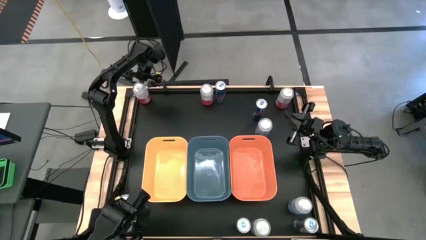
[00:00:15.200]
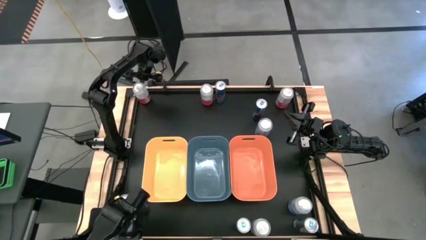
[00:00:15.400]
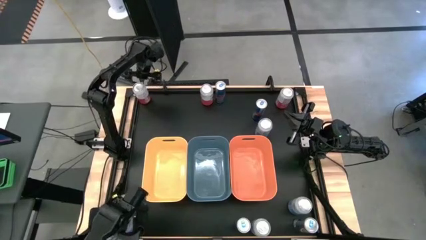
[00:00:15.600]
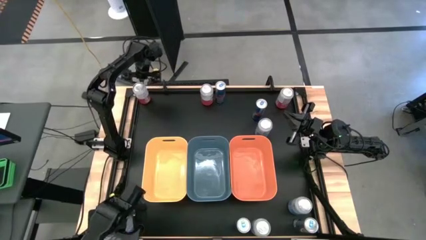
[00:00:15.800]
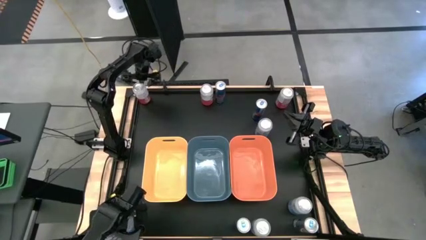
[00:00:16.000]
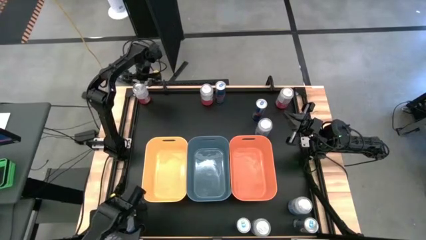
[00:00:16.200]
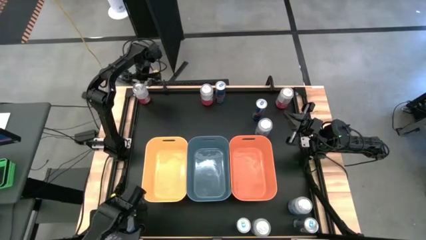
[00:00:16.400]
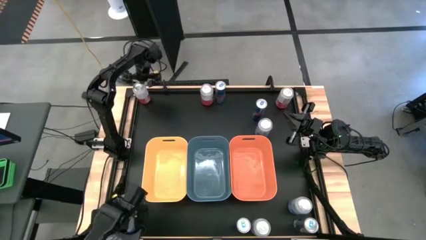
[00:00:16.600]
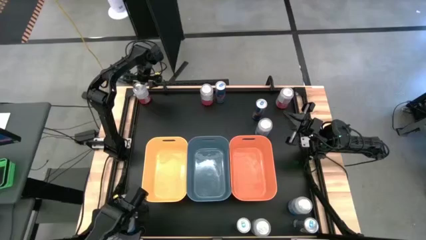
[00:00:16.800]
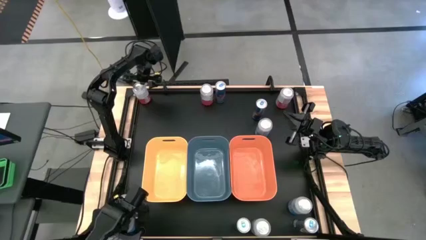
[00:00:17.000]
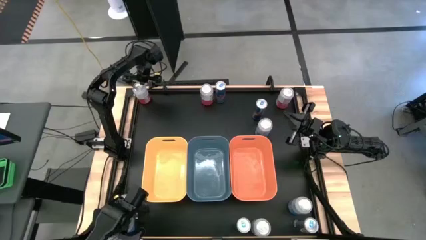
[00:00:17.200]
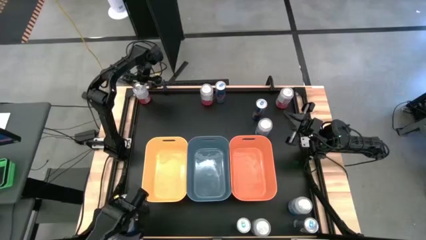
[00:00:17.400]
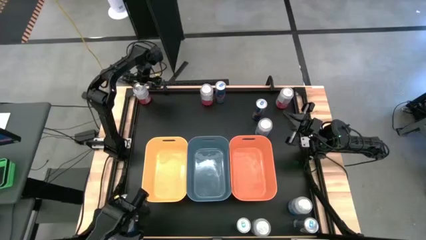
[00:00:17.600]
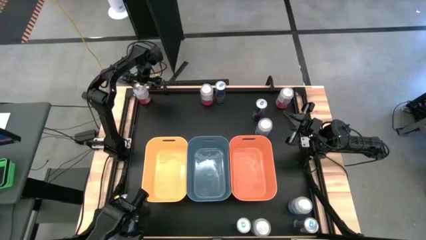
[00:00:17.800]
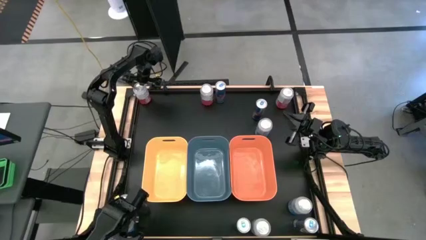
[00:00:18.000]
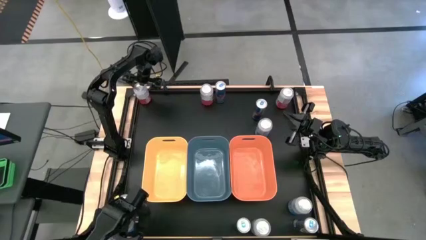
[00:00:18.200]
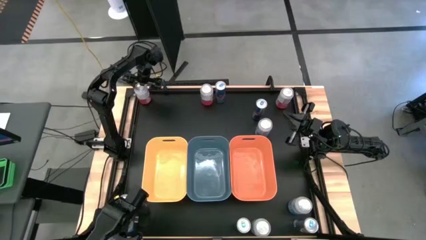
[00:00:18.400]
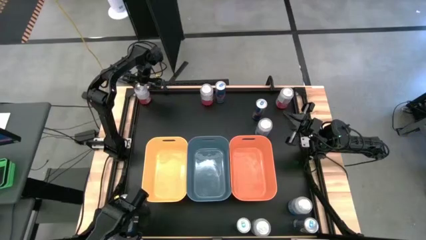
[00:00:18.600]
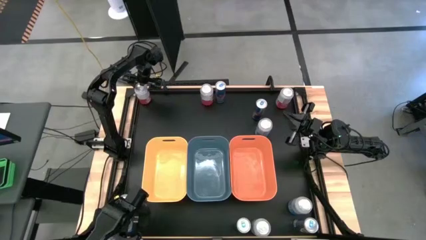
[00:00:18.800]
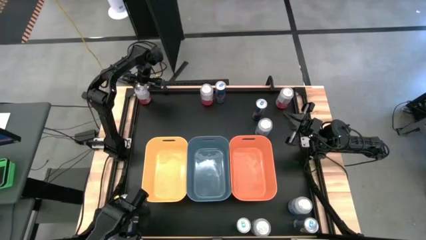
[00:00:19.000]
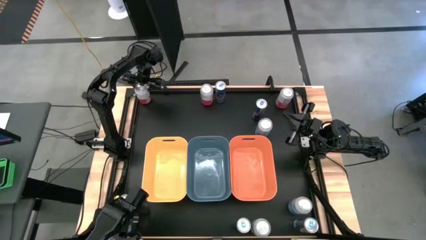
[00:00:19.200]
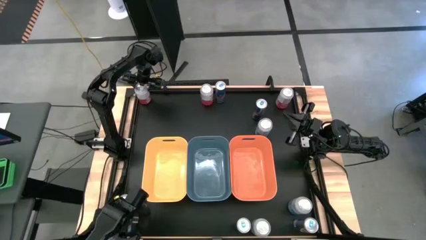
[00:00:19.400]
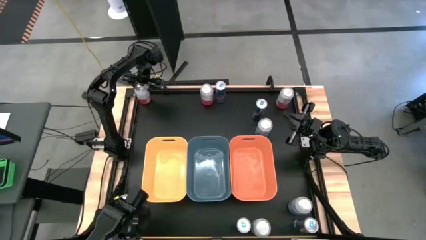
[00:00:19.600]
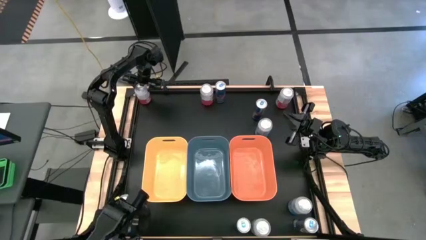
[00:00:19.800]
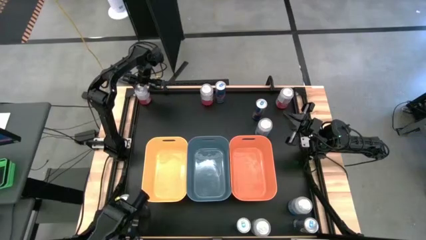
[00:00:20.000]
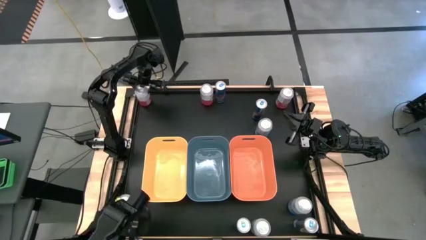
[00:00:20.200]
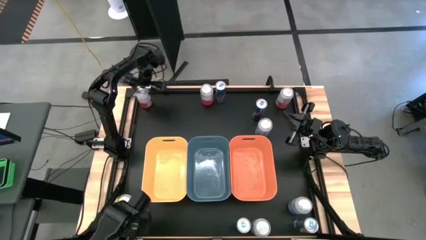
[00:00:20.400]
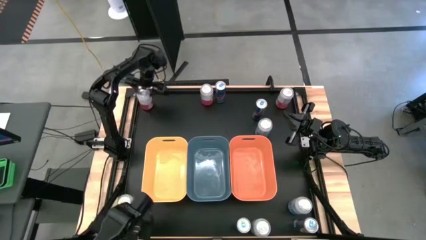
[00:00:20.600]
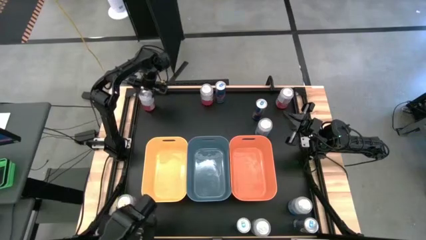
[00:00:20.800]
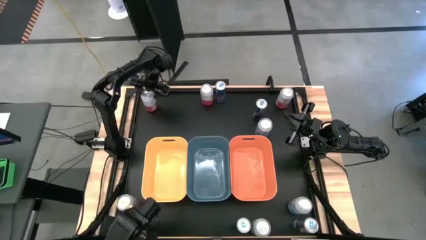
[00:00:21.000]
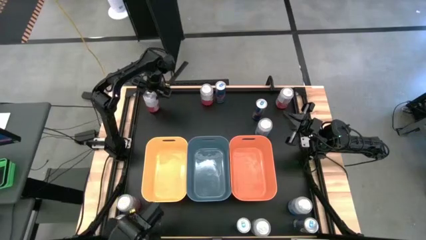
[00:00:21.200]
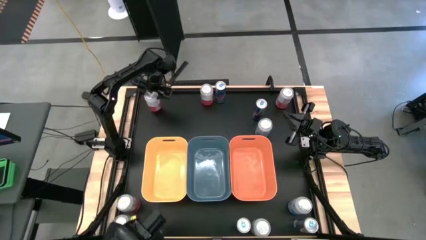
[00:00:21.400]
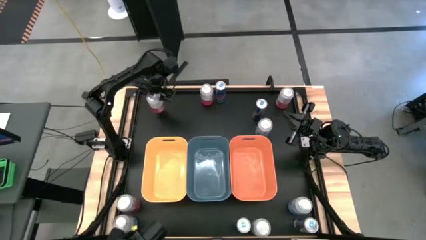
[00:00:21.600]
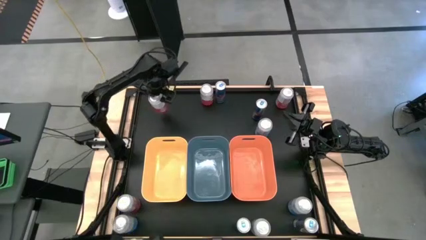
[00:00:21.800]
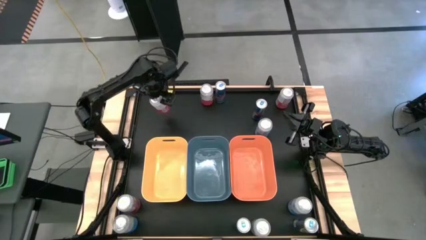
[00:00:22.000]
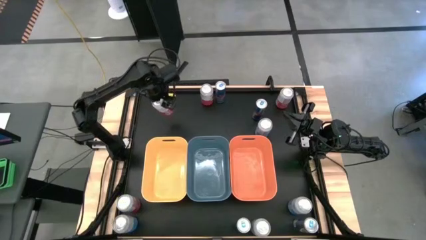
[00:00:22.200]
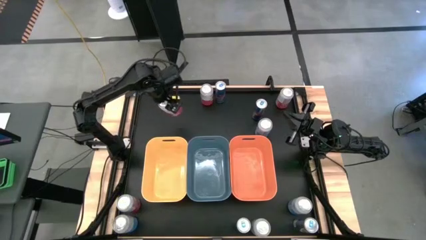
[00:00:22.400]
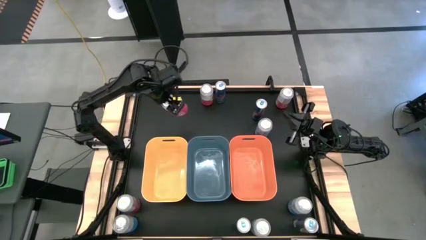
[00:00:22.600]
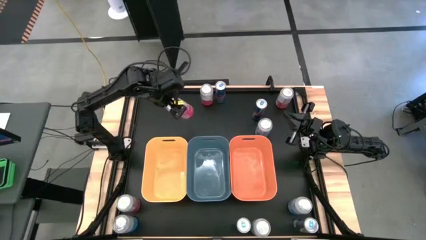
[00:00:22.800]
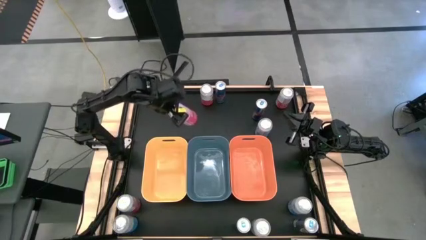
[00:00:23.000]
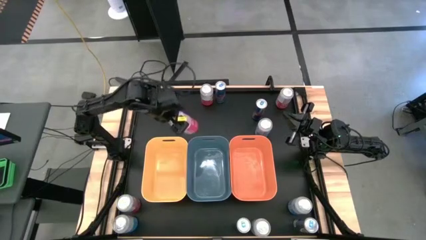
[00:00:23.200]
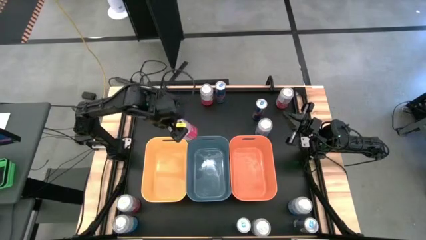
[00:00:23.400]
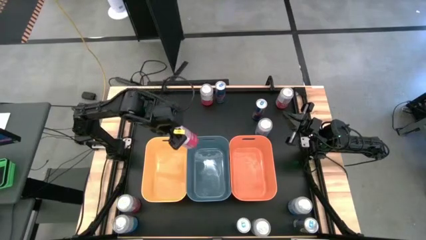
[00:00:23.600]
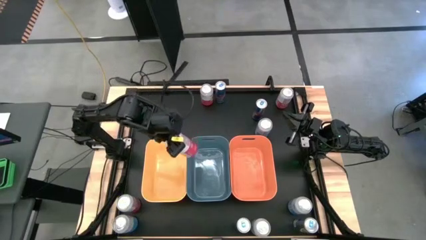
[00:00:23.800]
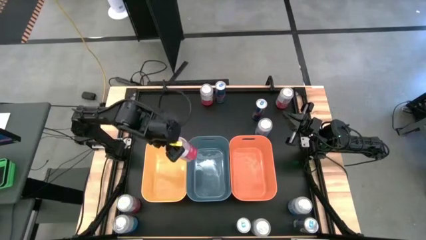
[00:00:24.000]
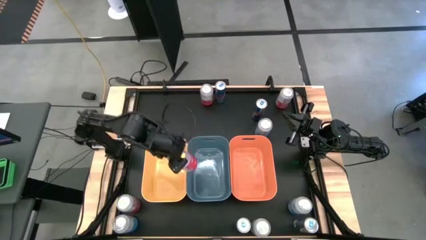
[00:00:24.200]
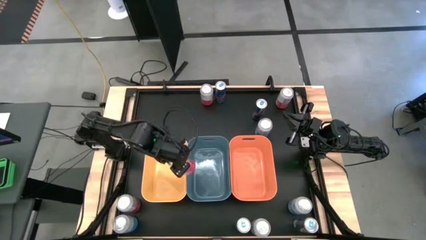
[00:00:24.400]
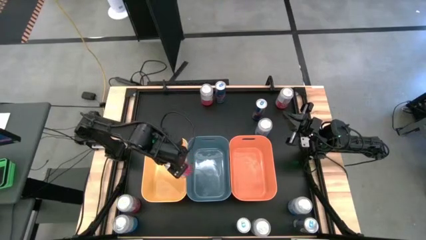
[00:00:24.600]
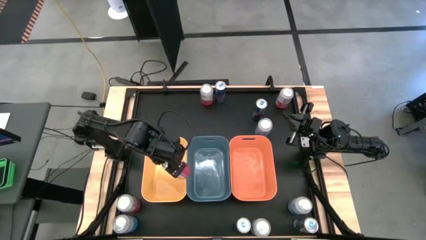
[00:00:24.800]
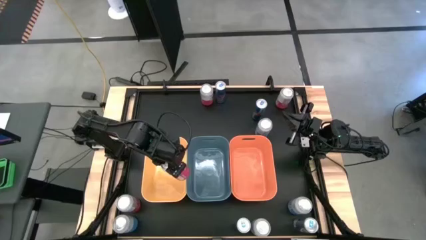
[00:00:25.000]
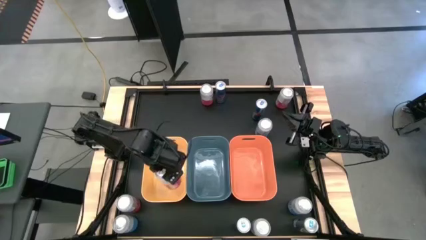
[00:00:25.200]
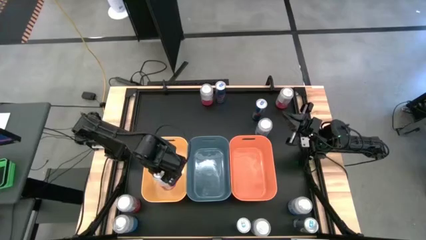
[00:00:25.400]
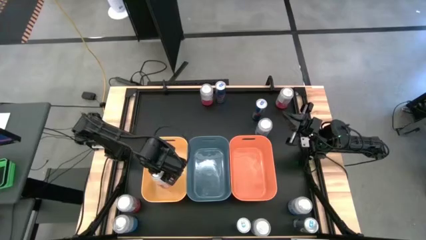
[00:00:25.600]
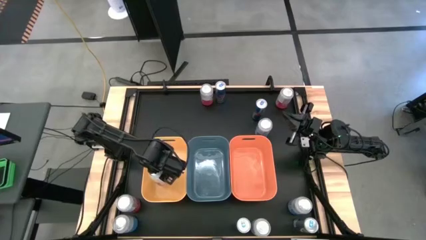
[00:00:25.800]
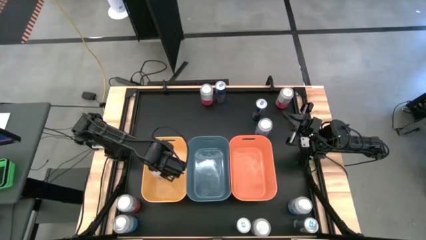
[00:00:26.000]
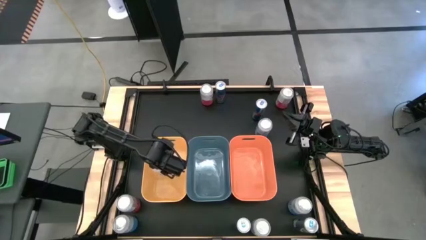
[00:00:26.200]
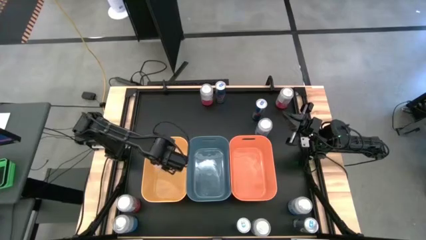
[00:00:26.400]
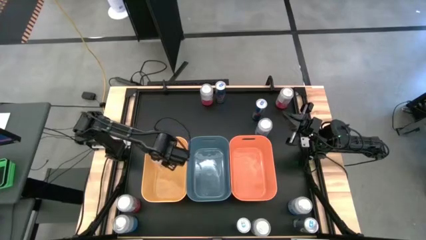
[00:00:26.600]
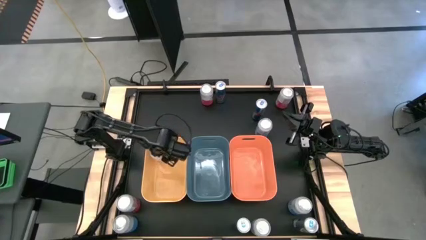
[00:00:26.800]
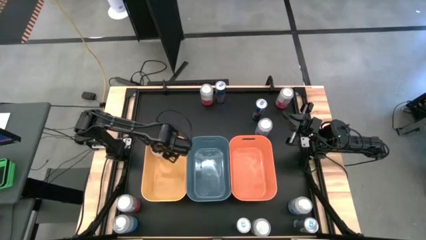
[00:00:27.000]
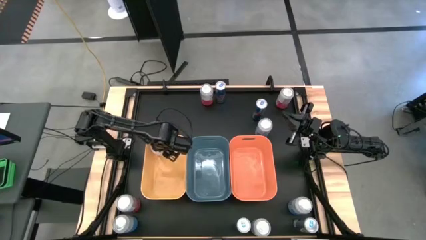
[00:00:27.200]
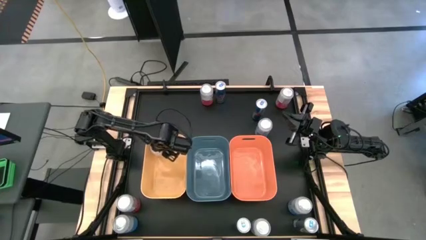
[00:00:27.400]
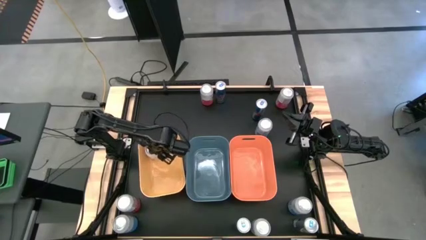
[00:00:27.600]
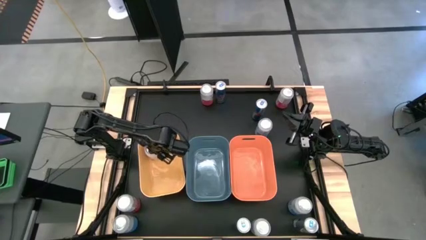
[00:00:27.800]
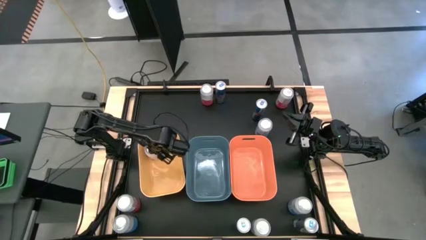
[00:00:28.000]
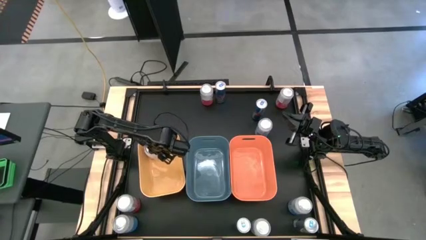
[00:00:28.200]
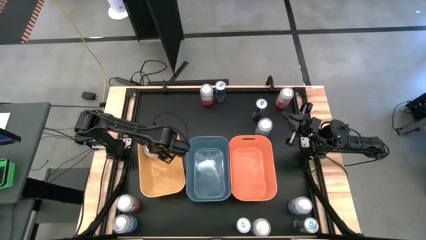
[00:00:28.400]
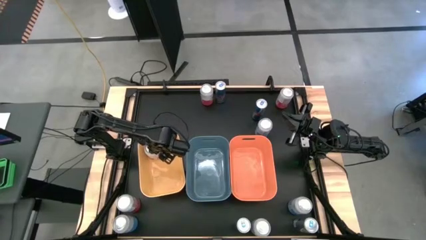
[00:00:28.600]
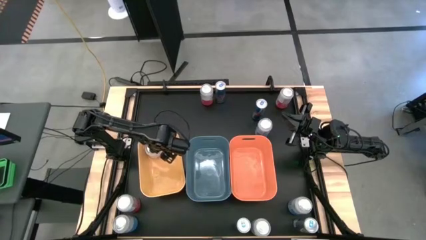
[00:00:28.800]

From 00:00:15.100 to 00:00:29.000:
Task: Sort soda cans
Put the top left pink-white soda can into the yellow bin
